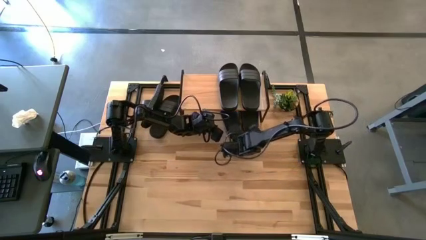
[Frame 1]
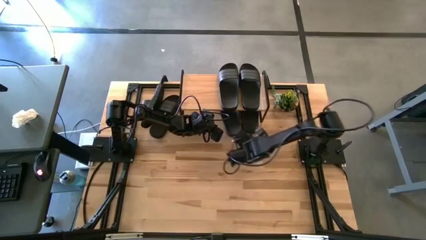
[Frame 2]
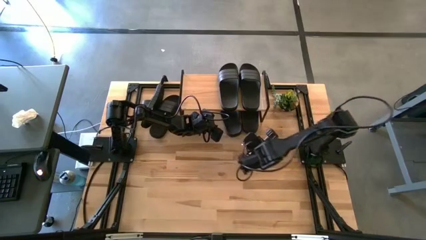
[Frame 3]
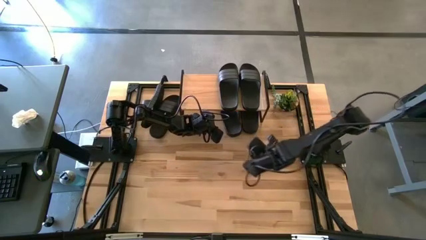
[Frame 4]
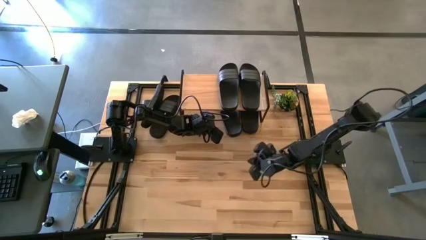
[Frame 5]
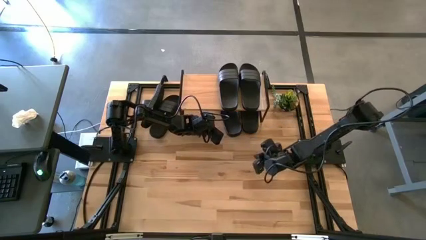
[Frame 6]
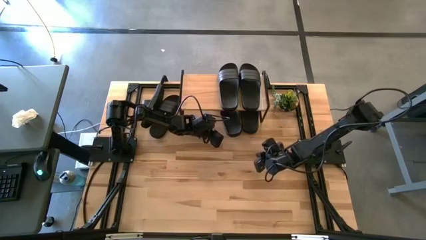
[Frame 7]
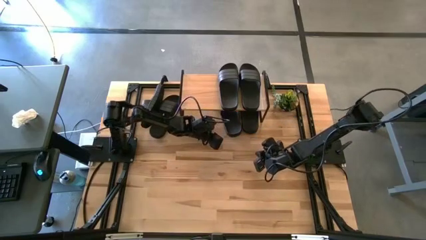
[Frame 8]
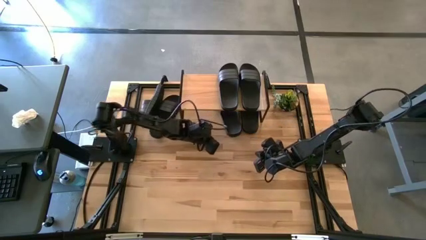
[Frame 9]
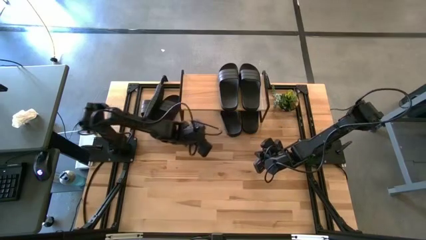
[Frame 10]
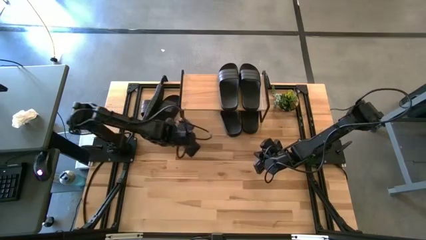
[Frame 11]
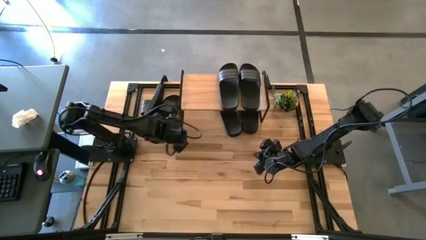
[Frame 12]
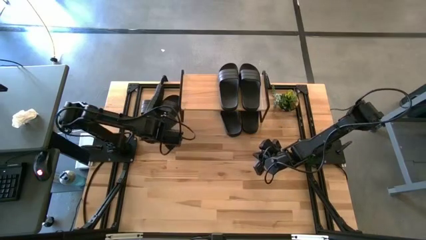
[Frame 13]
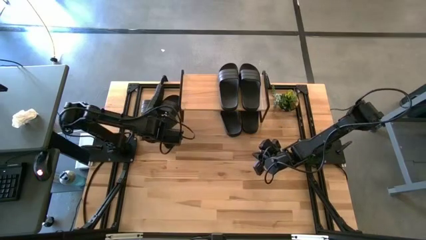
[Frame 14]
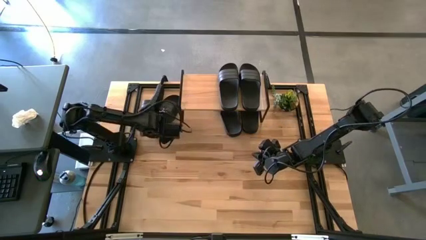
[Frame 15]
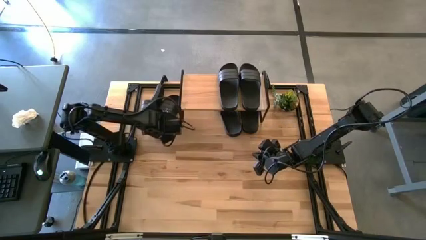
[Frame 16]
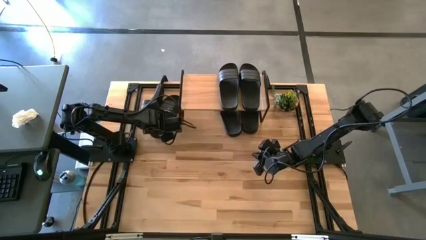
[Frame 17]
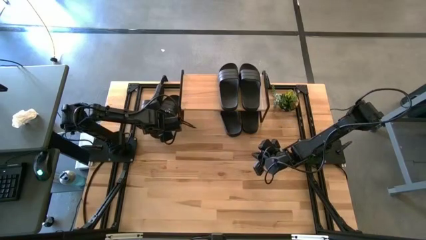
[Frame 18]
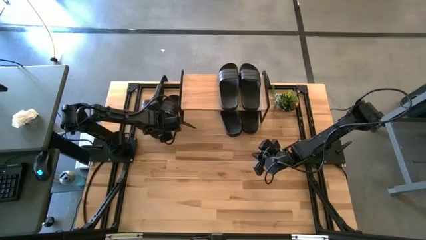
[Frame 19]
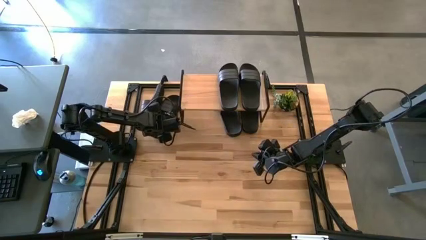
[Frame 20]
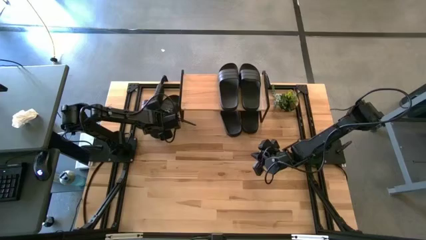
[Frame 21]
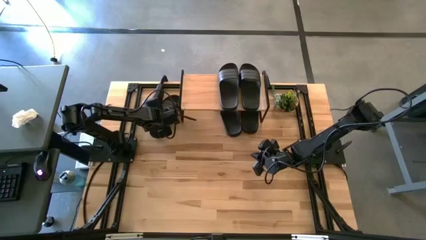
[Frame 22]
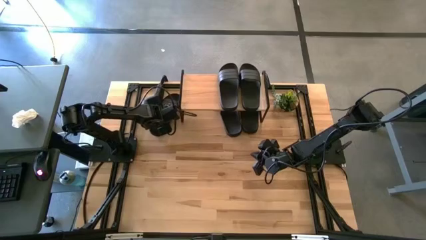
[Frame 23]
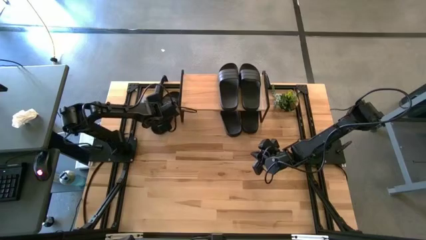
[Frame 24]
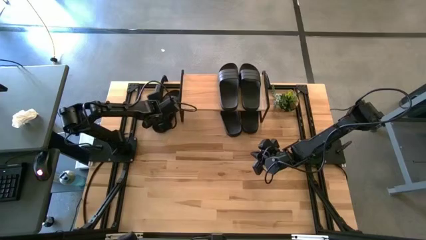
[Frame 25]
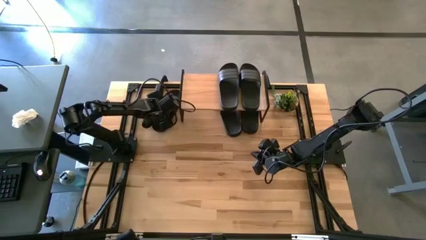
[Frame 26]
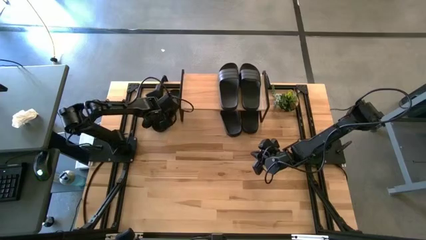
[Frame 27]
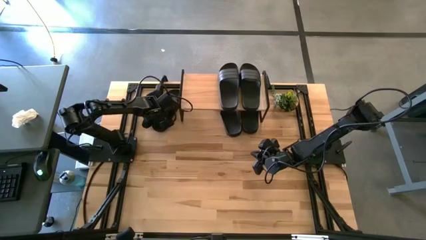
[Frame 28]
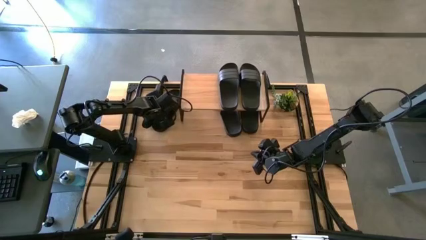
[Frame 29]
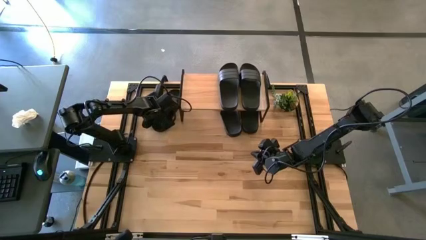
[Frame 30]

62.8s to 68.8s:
Task: Pick and place slides into the shelf
Move the black slipper to the middle of the table

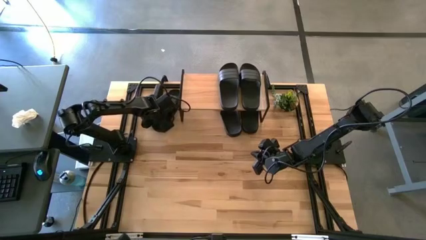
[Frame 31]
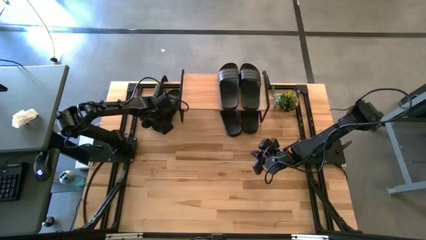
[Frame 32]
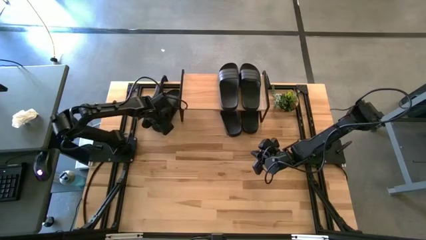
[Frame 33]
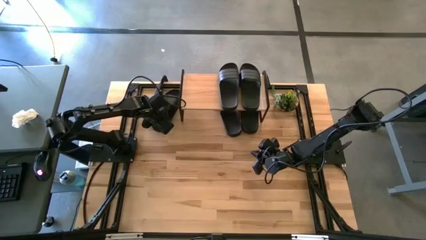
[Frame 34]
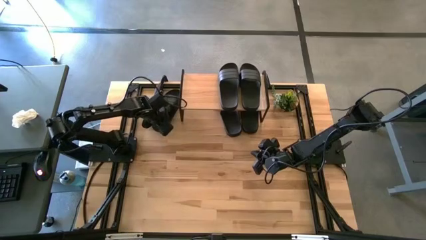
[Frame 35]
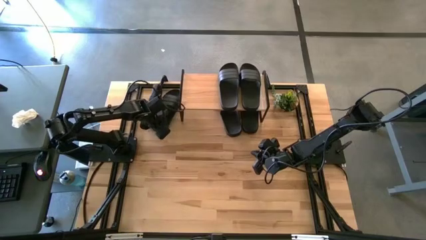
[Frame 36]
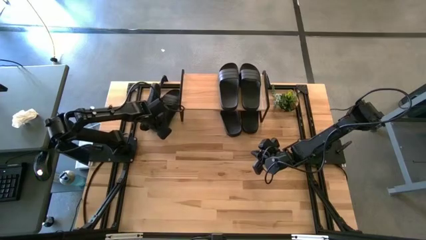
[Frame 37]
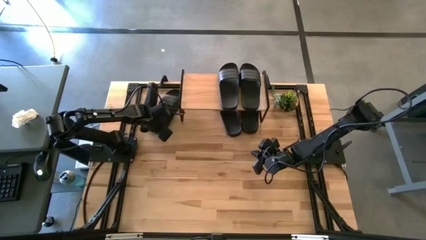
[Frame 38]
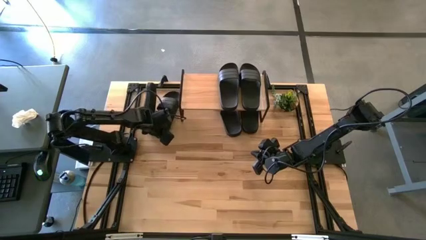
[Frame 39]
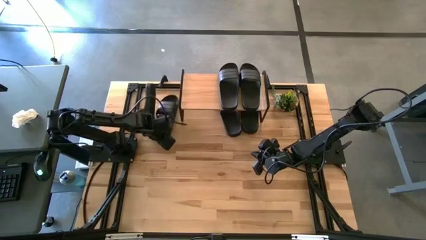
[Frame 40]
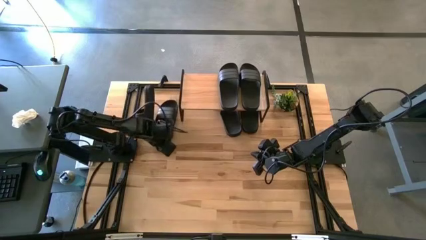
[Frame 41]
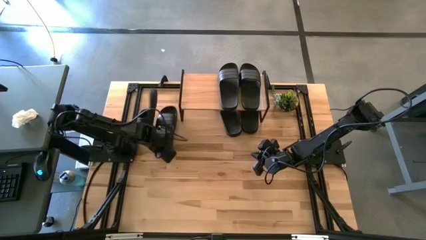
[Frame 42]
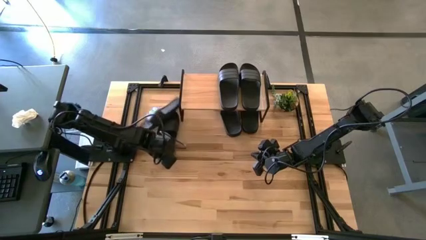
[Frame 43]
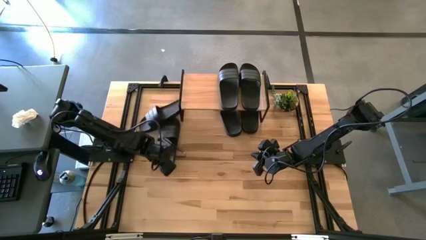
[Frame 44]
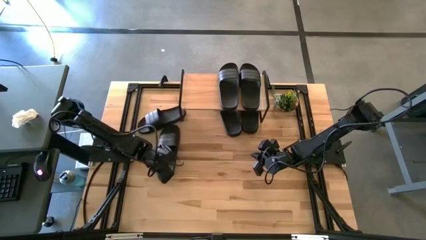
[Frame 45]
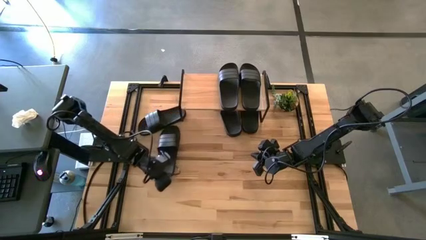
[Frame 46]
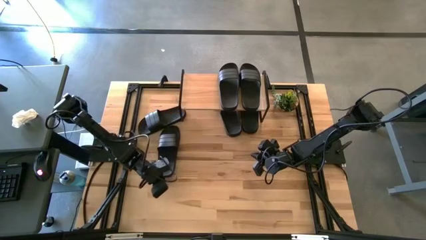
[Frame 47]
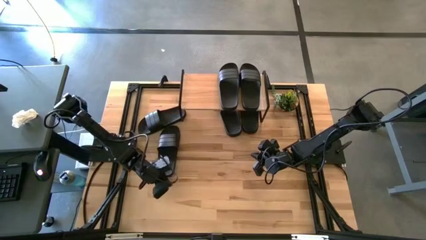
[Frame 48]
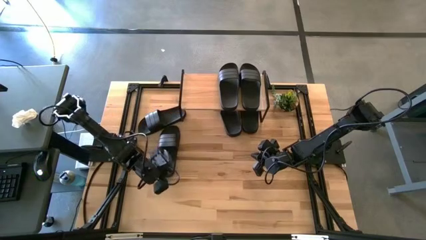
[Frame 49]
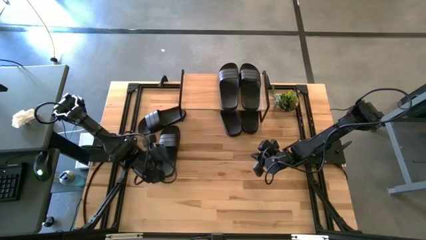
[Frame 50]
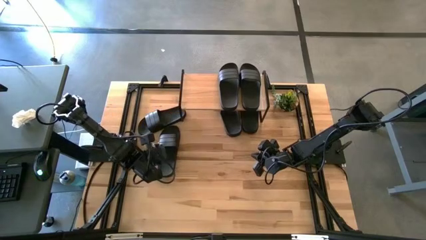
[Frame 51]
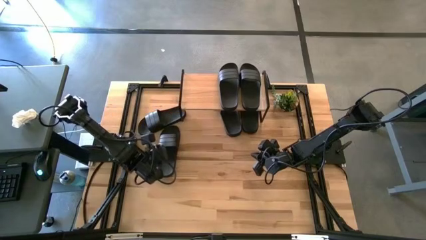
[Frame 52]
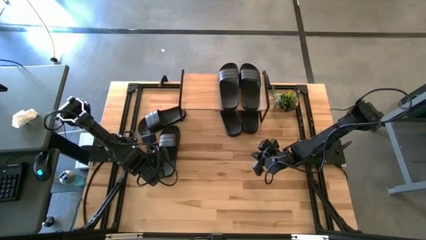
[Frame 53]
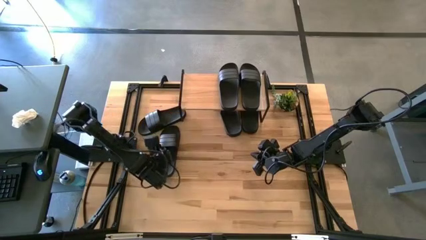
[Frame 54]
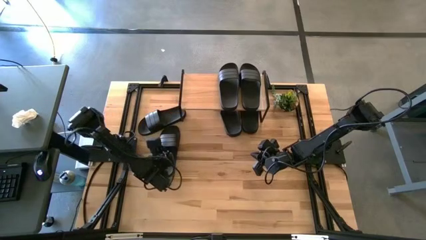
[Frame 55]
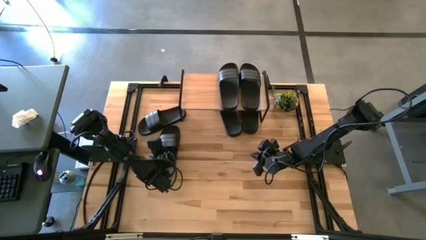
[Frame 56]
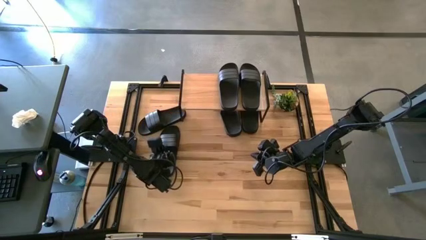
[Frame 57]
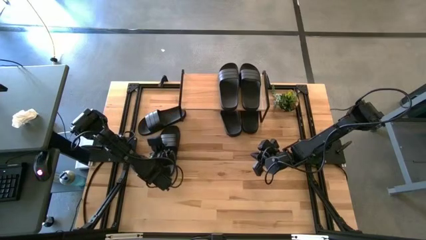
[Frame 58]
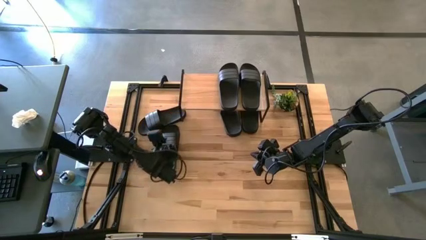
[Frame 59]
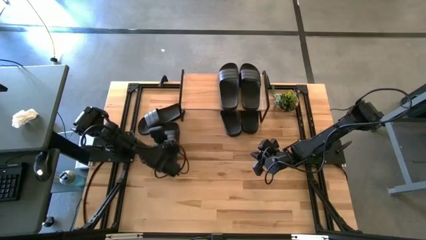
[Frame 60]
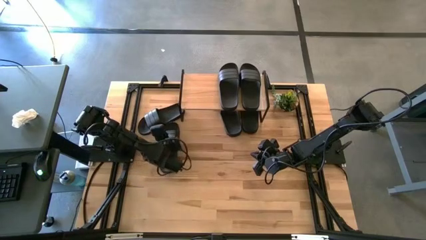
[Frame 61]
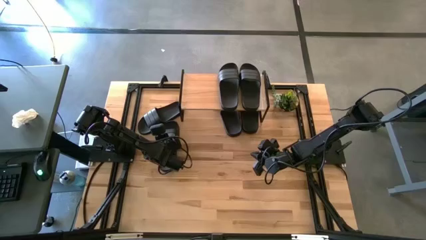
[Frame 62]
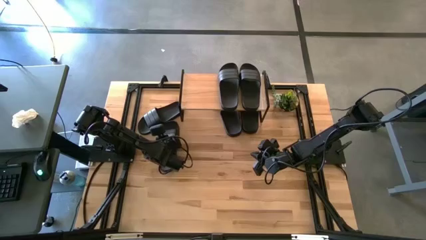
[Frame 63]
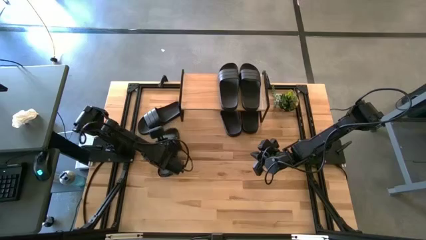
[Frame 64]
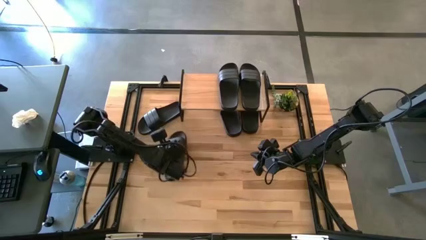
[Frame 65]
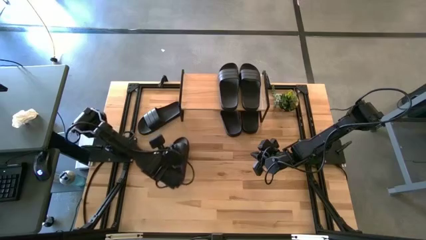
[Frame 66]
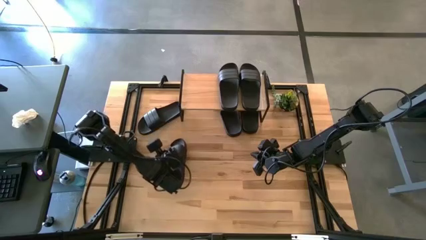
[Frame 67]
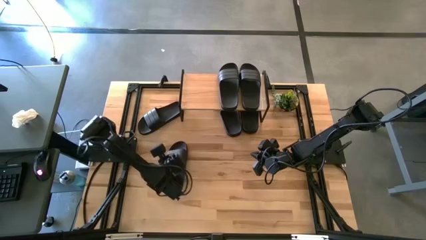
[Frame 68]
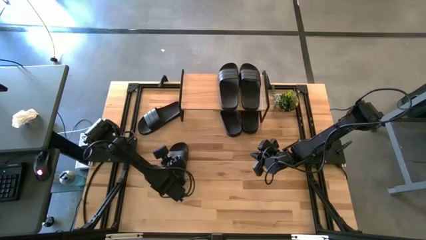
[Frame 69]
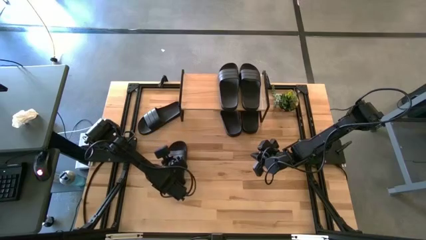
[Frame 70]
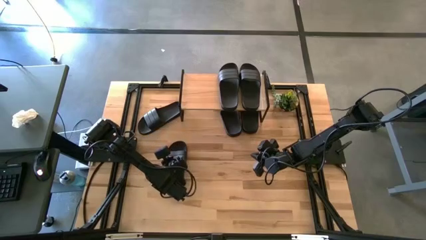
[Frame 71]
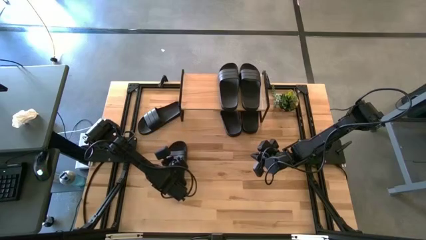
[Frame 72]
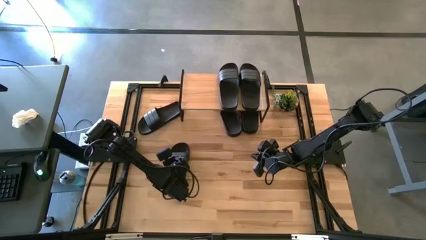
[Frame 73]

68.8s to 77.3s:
Move the black slipper to the middle of the table
